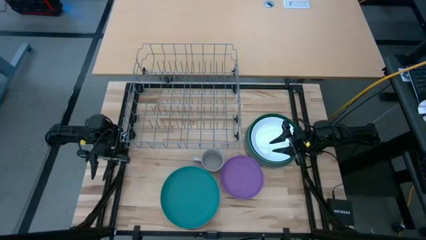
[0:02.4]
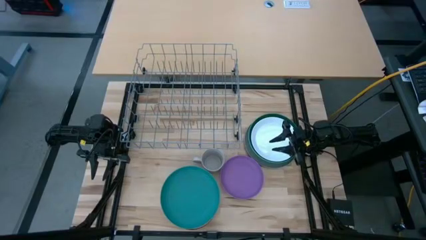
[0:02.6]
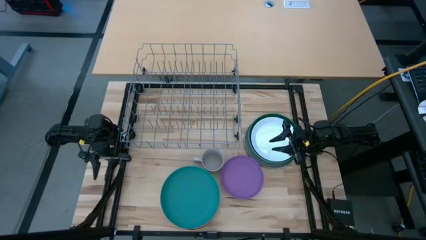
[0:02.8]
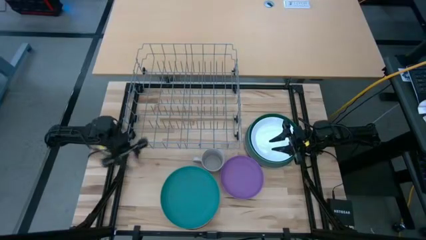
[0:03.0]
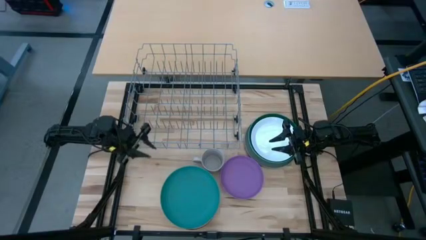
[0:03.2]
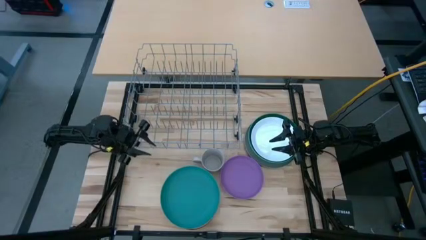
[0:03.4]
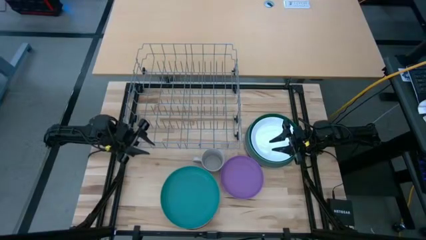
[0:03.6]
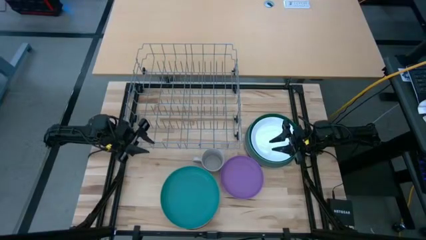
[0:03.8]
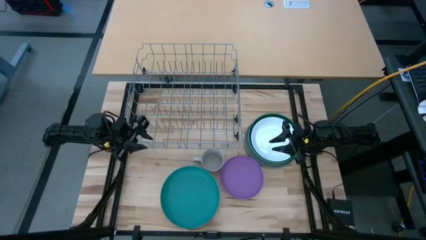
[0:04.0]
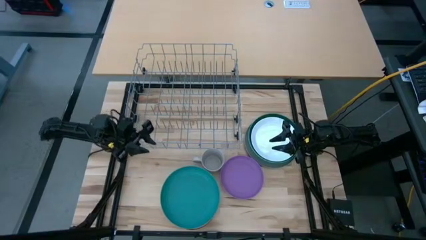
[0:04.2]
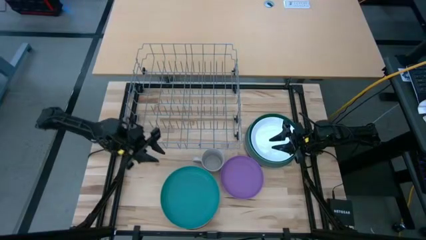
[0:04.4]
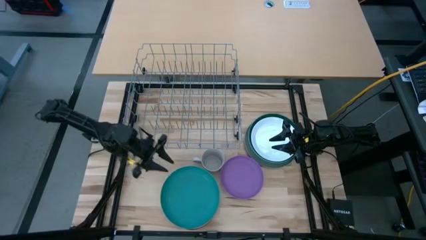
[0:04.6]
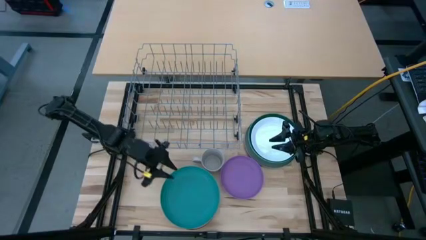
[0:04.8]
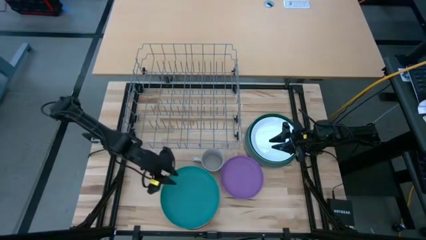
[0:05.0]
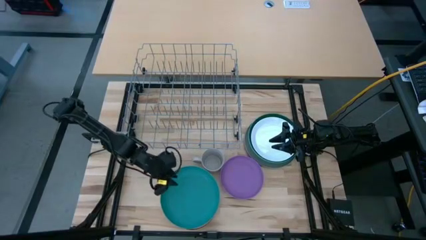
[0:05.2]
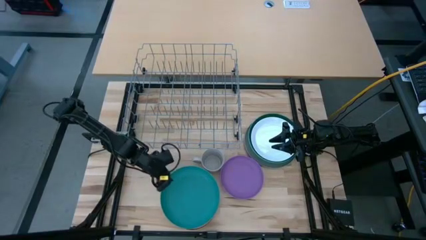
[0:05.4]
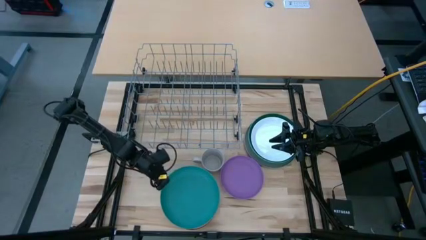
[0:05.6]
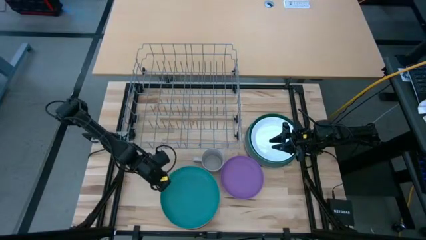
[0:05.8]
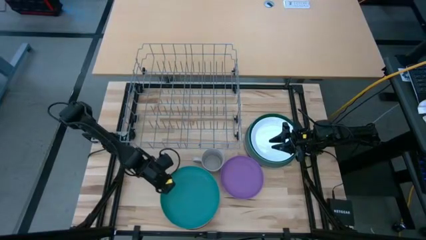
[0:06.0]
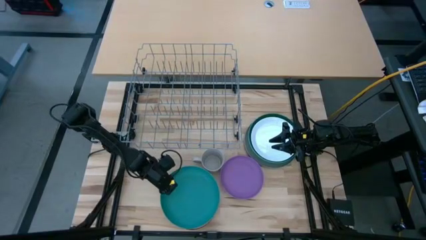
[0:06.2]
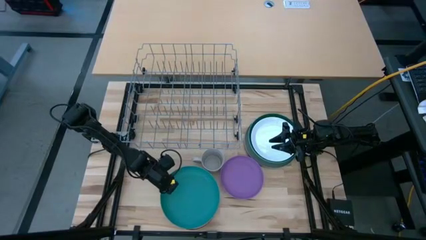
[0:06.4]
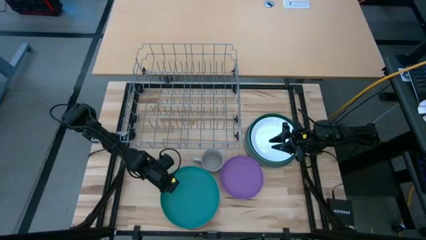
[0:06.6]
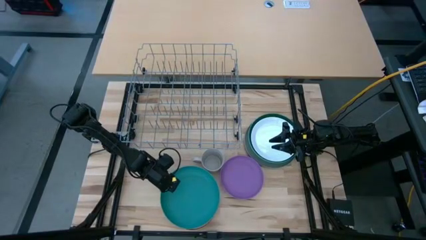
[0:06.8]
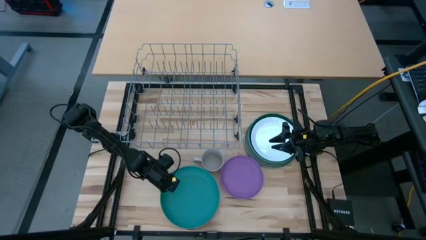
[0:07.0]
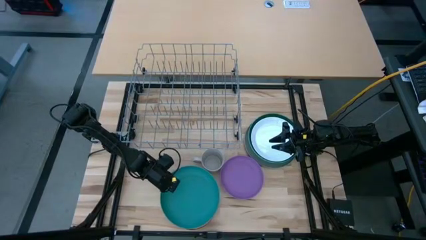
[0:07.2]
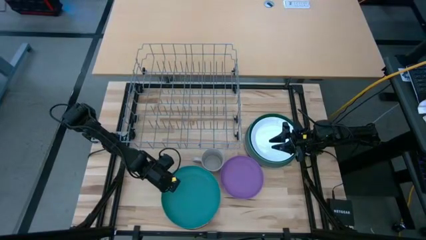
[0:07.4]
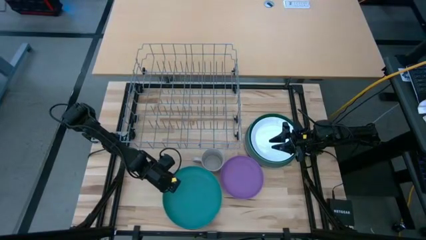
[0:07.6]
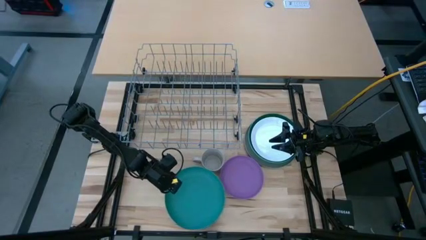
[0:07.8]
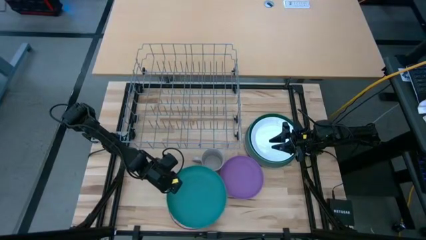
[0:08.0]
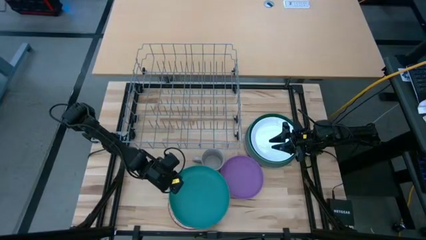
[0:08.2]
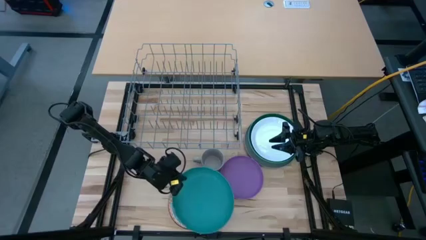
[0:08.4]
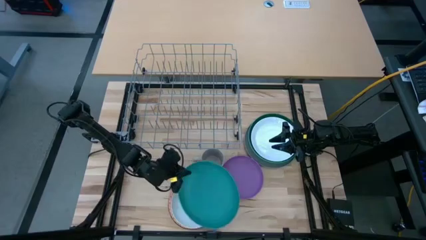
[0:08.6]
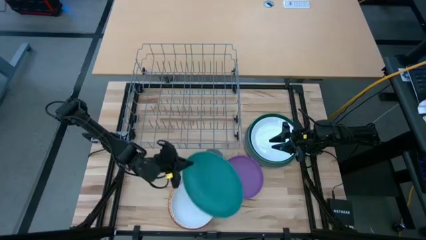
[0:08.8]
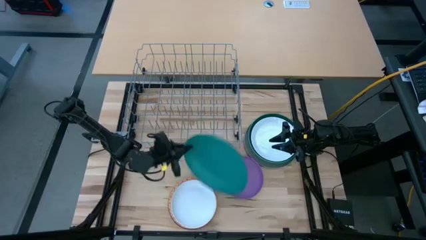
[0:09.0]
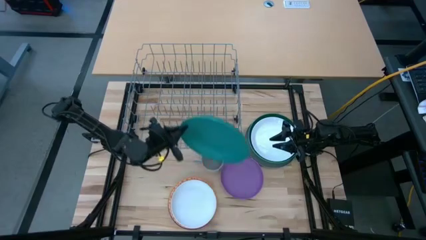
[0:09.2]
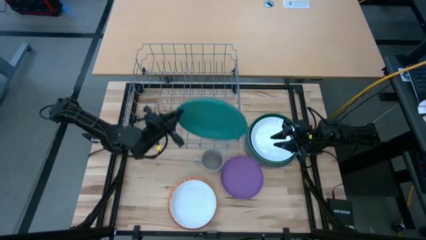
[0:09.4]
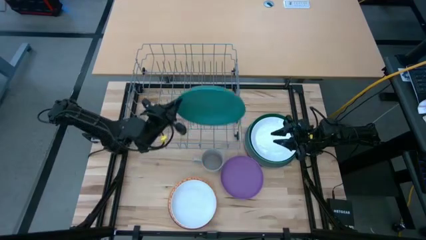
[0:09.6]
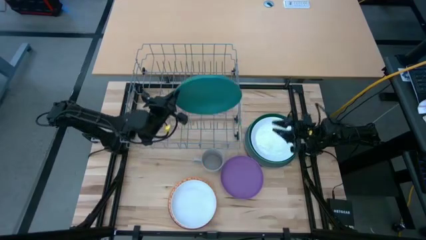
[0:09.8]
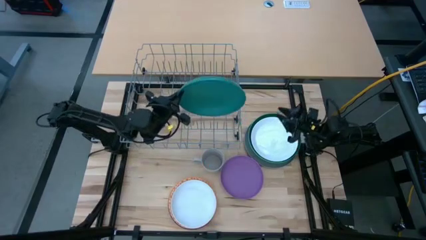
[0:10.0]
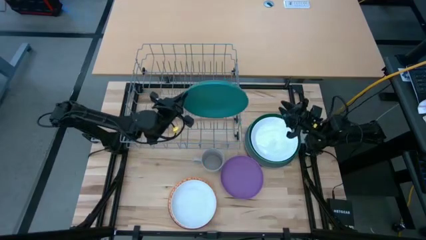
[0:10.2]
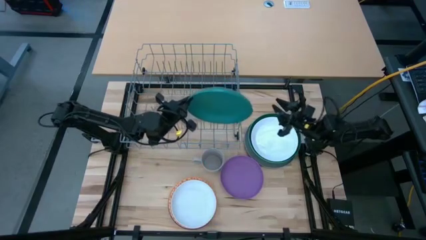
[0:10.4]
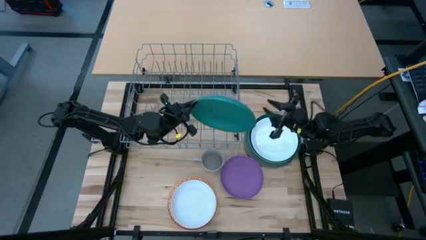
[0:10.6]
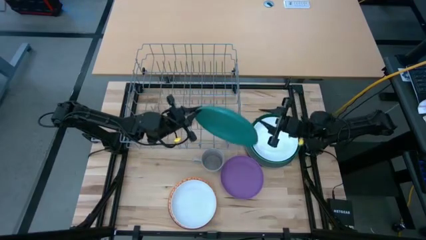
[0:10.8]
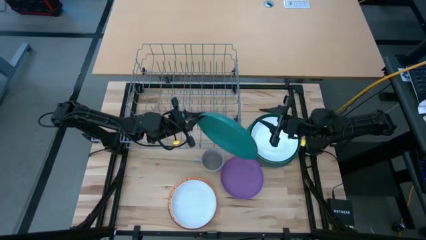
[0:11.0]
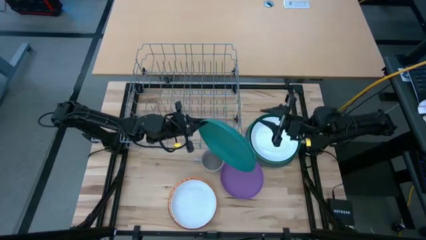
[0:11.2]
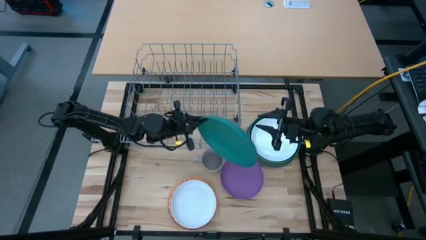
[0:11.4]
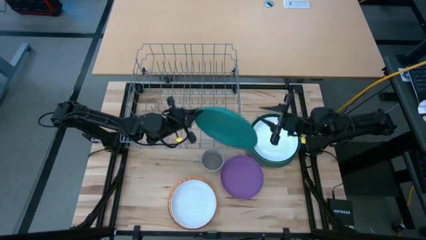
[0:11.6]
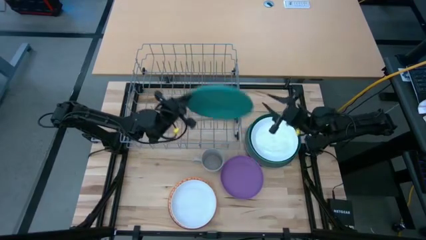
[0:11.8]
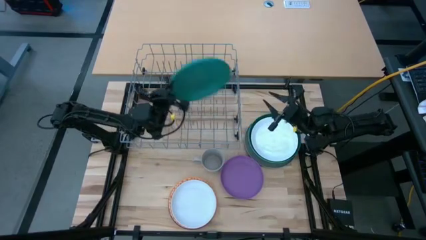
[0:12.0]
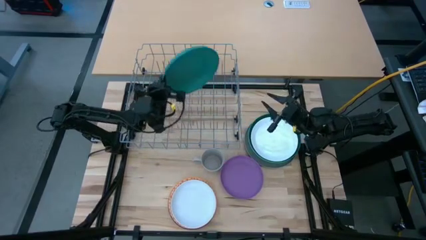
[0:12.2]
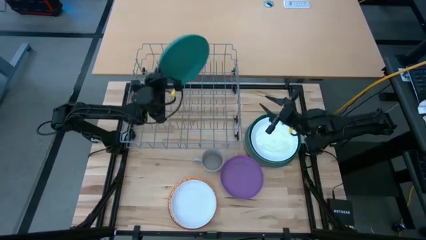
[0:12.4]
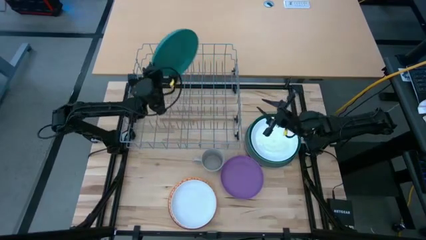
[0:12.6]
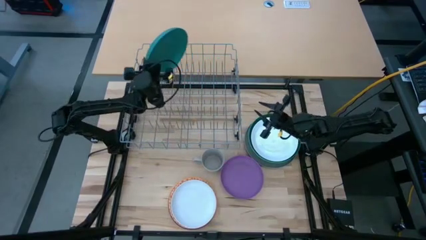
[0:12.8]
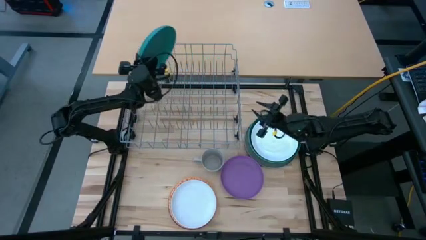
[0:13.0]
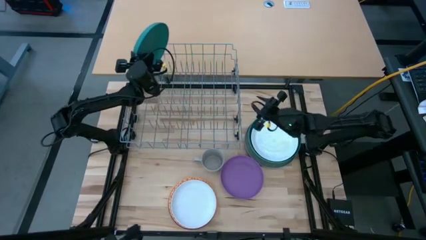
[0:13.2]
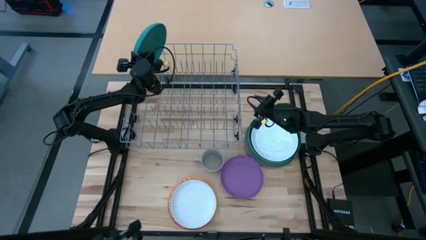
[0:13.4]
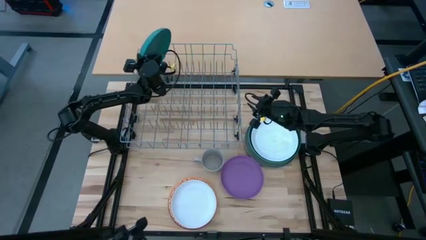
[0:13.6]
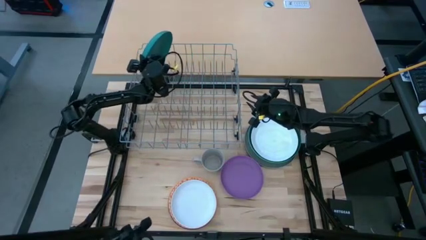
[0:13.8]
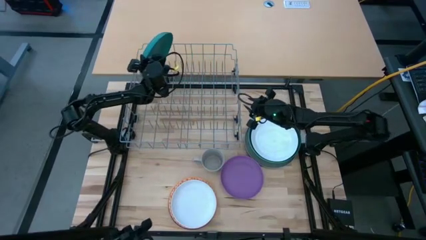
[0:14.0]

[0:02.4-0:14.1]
Task: Sort dishes
Put the blue plate in the dish rack
